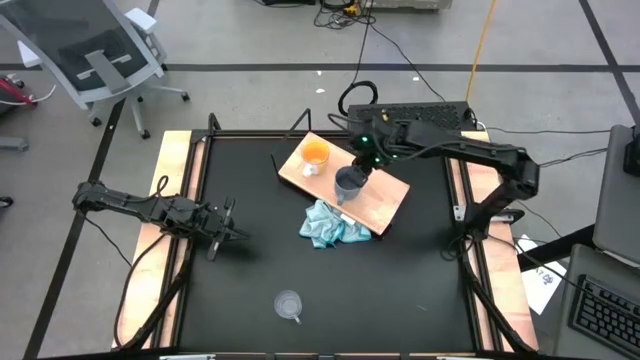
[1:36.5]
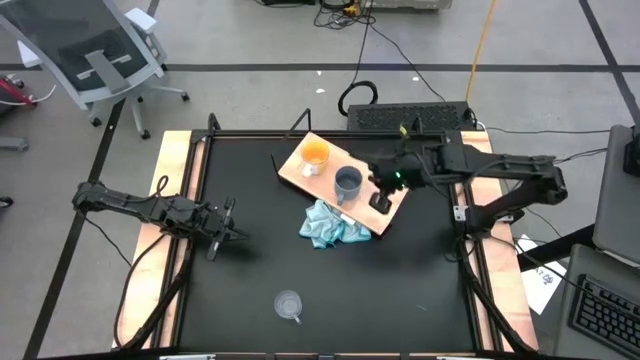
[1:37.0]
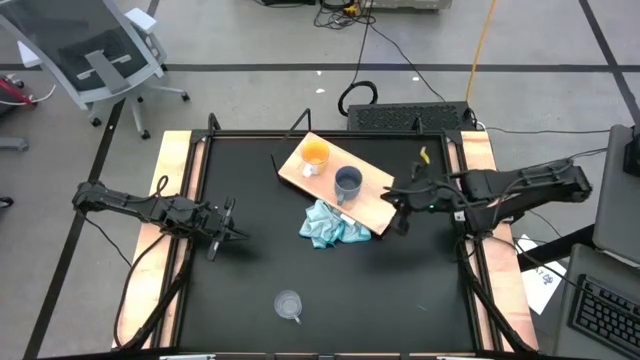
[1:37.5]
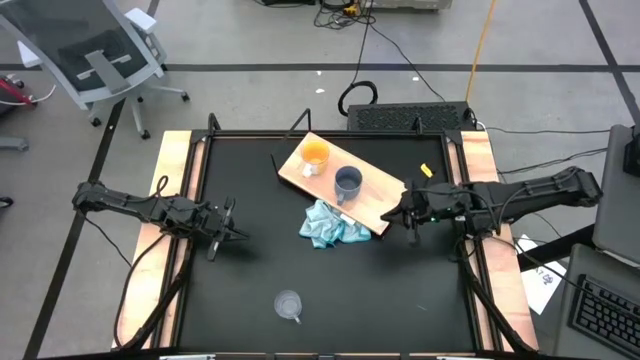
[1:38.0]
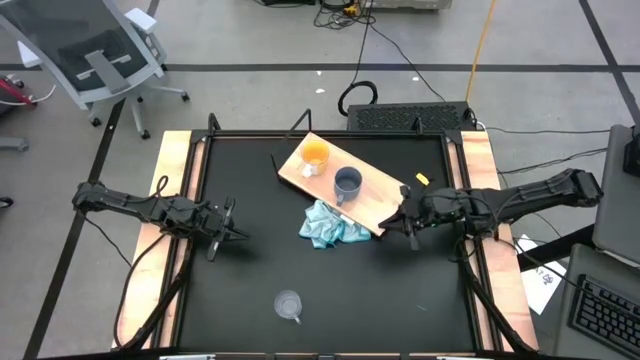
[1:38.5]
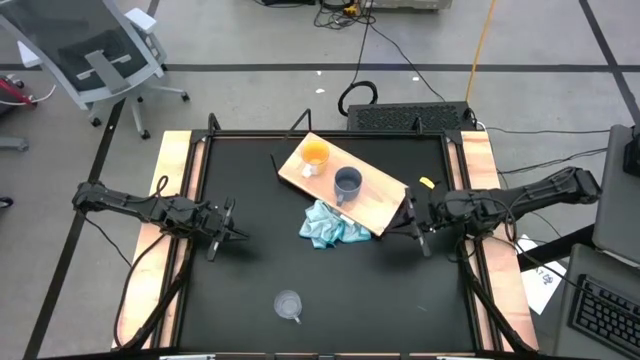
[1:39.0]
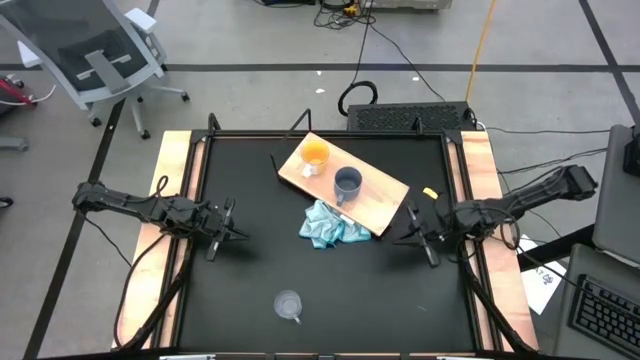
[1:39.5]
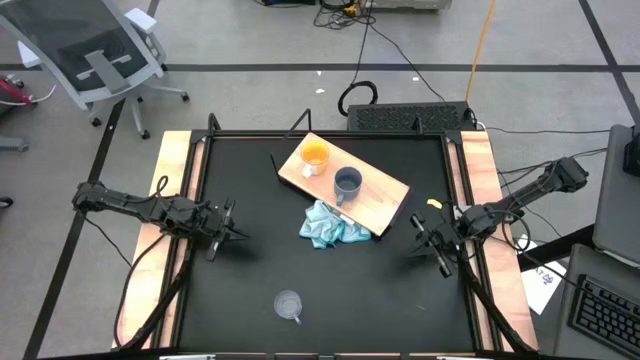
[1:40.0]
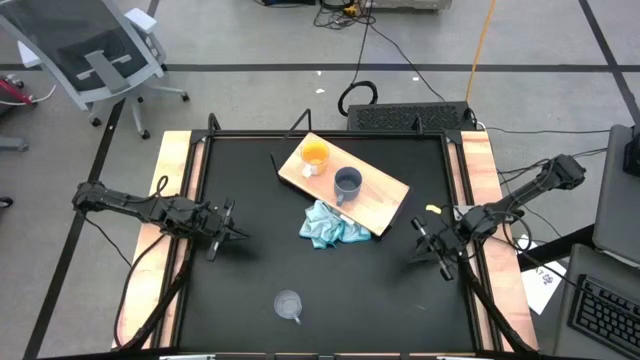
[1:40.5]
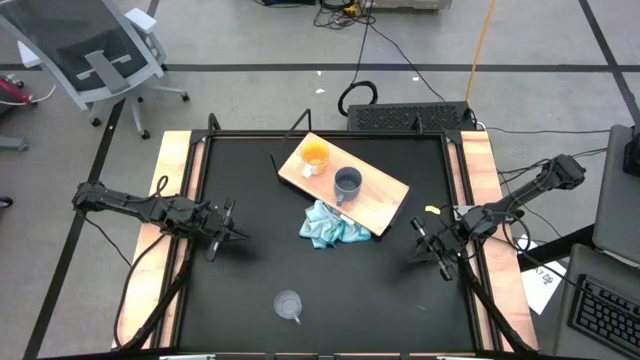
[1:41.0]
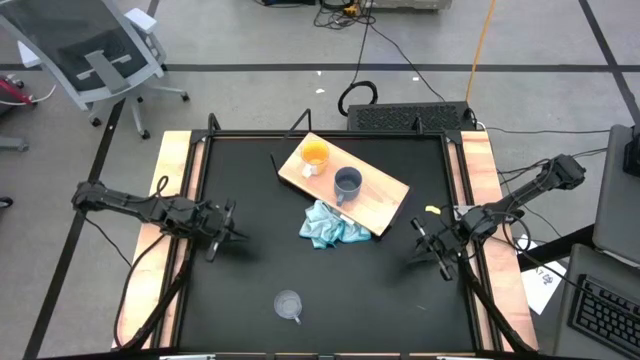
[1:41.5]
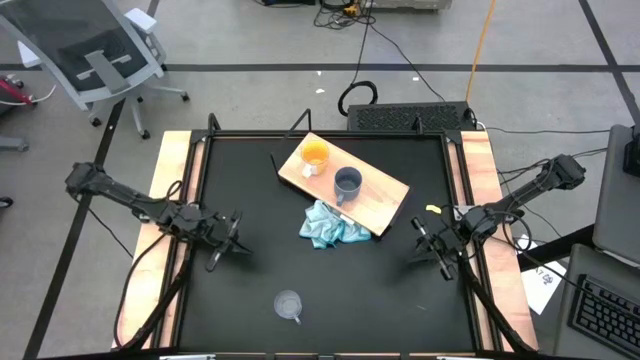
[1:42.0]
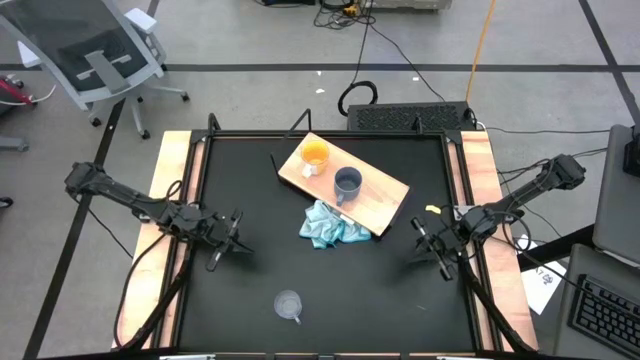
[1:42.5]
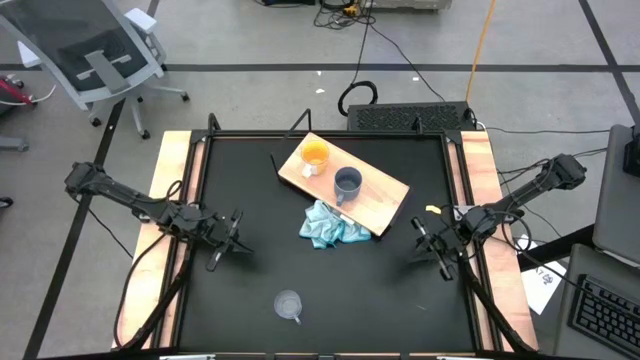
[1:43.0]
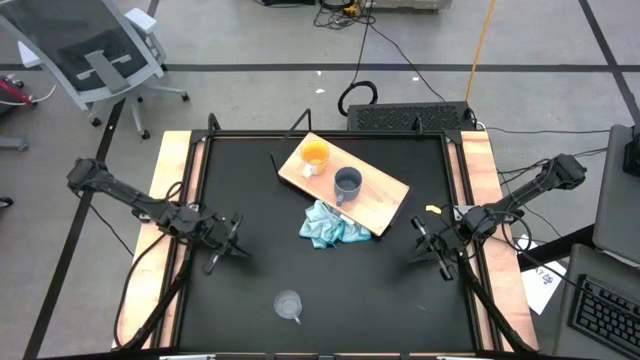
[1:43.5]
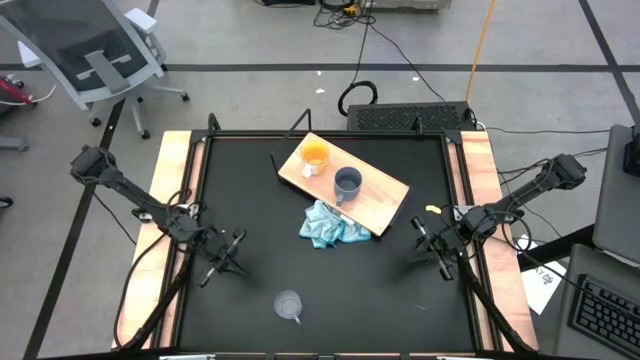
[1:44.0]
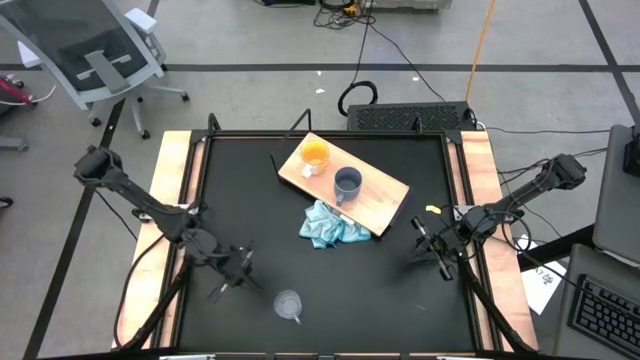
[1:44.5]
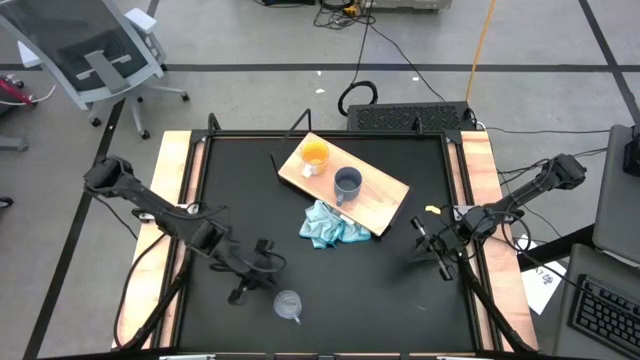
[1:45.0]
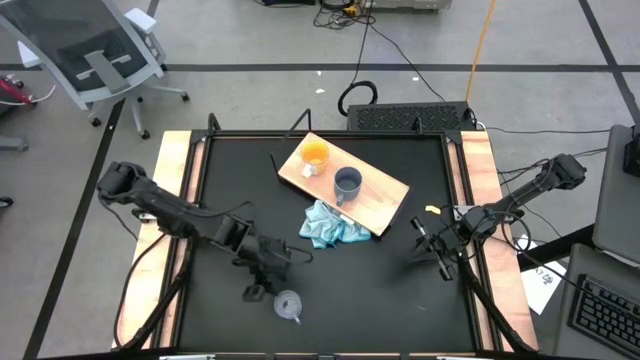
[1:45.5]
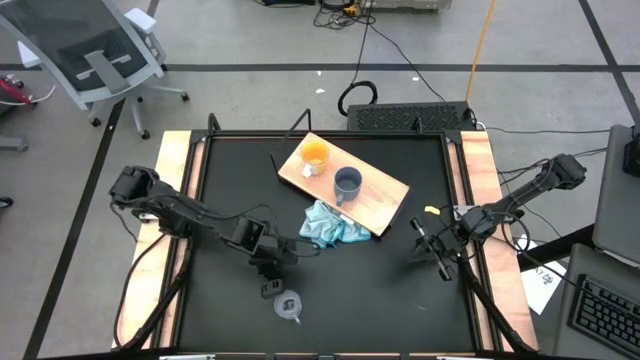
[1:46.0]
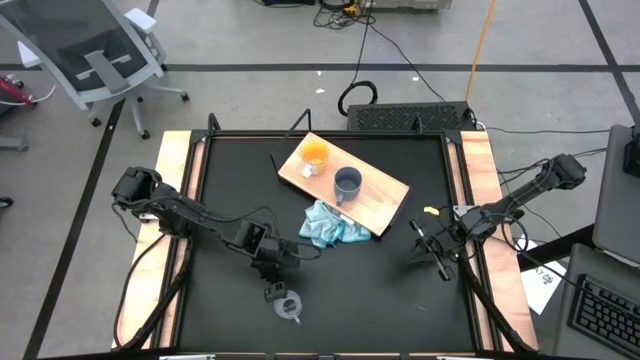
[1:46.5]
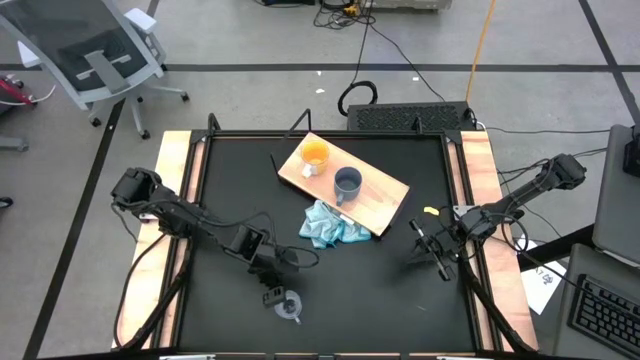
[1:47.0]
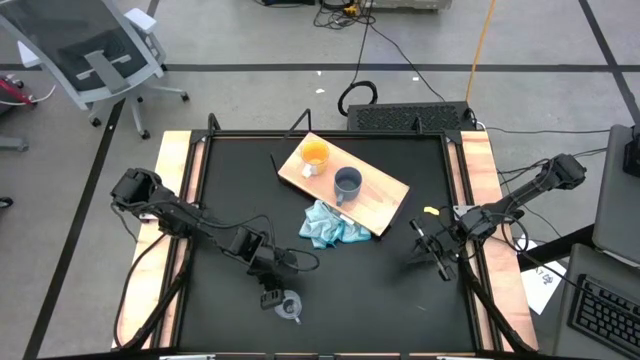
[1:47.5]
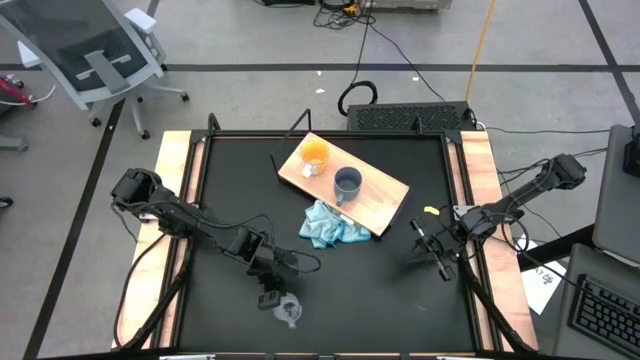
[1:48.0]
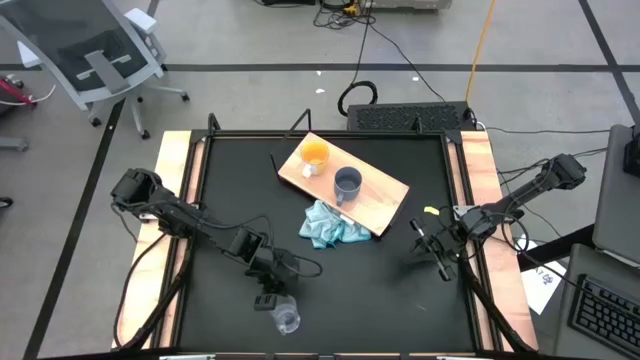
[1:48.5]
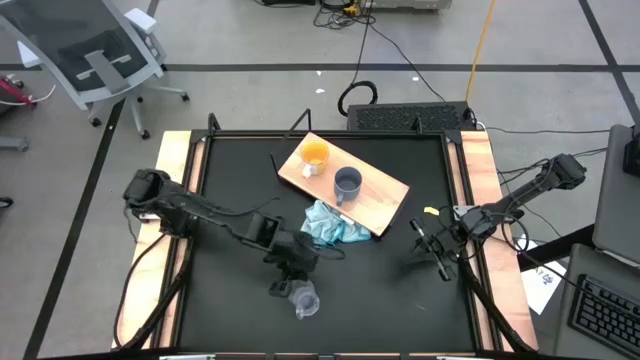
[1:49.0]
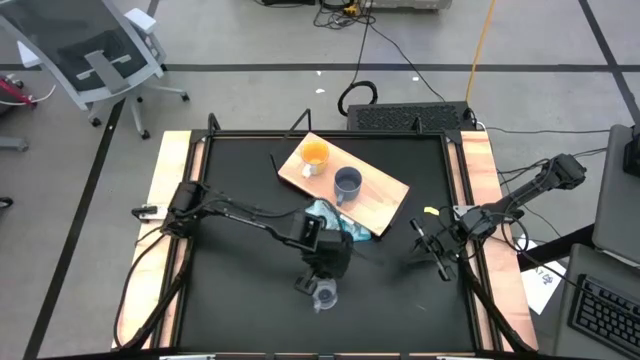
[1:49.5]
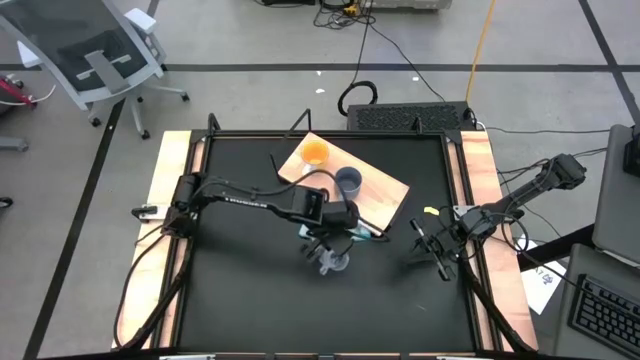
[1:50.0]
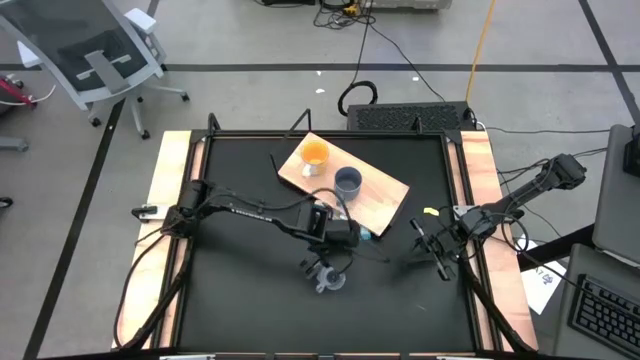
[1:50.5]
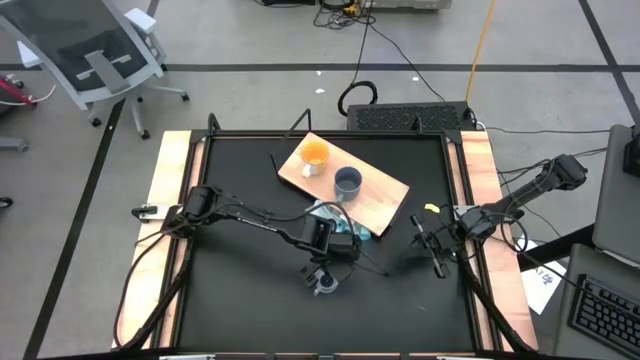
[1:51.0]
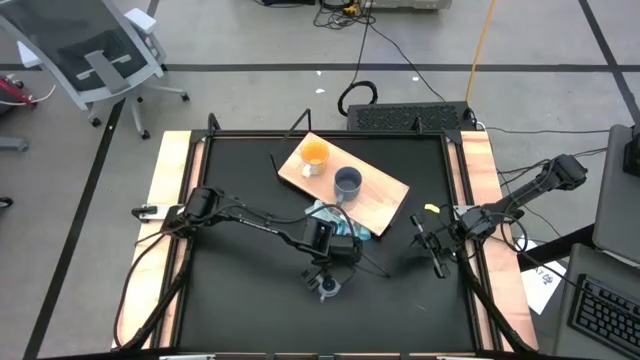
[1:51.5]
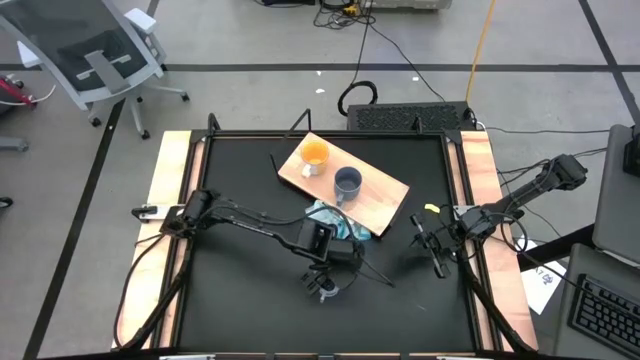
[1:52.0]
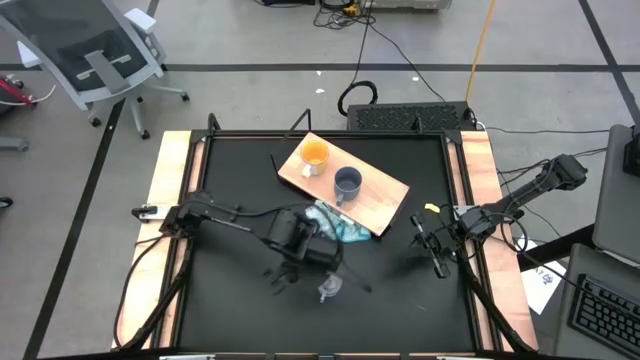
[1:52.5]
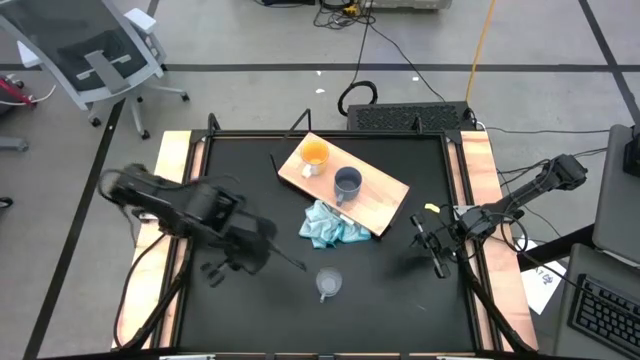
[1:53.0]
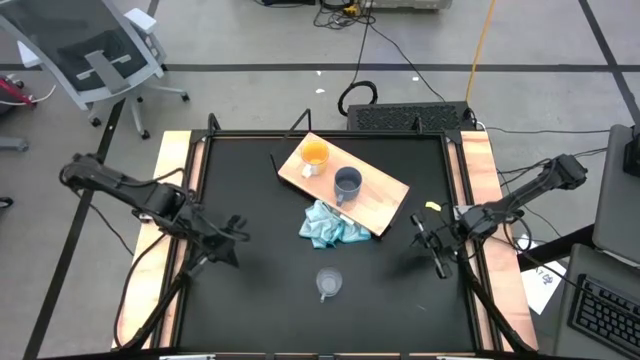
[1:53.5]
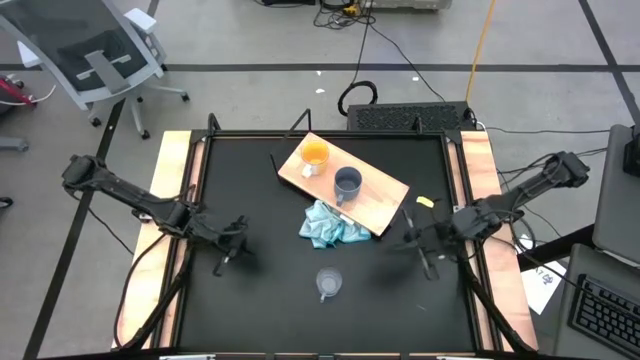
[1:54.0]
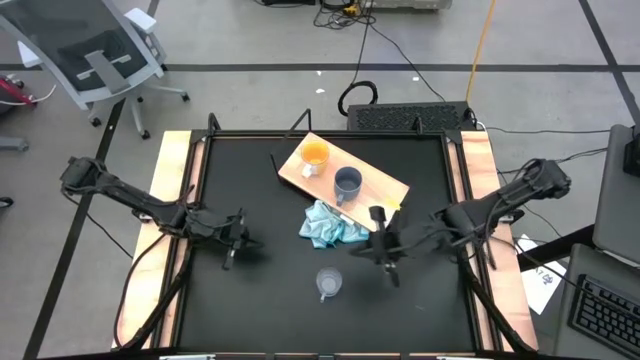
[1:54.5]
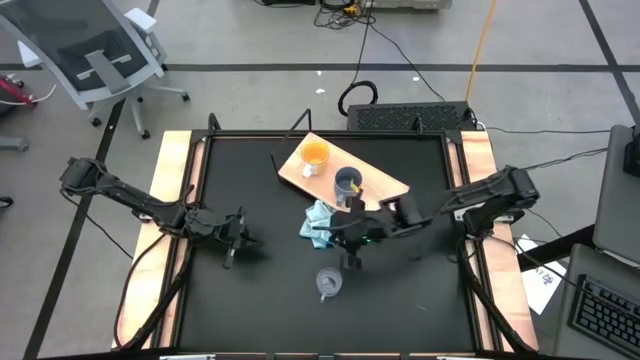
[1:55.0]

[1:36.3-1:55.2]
Task: Stack small to large cups/mugs on shelf
Put the transparent mug on the shelf
